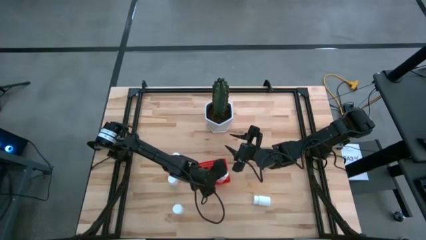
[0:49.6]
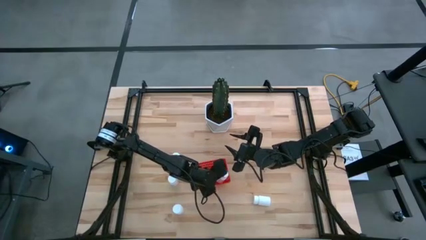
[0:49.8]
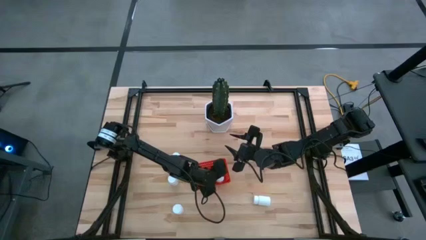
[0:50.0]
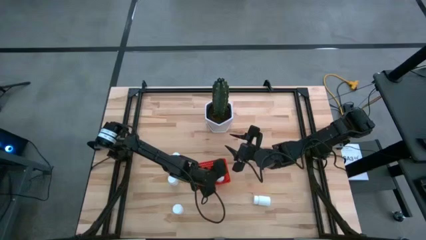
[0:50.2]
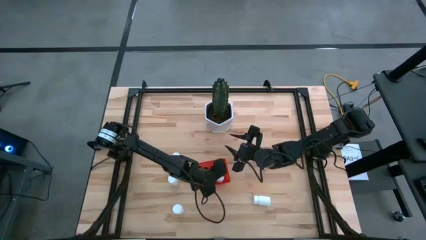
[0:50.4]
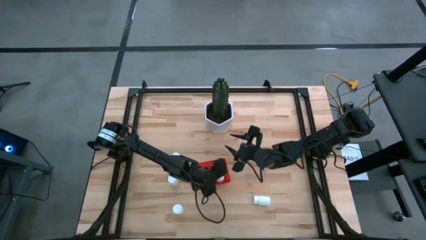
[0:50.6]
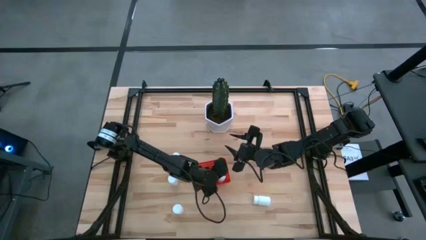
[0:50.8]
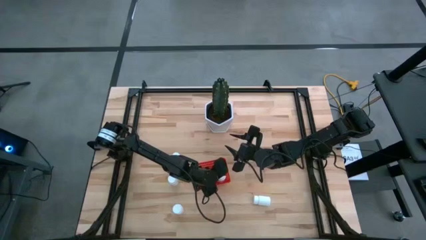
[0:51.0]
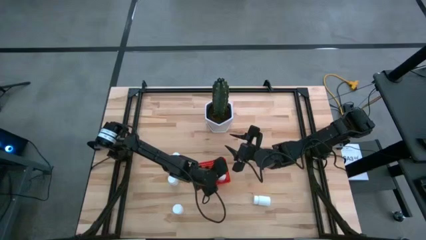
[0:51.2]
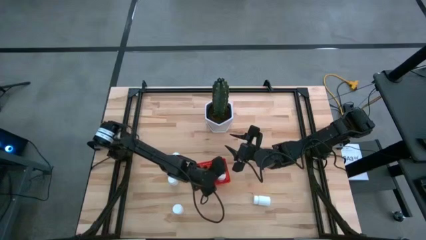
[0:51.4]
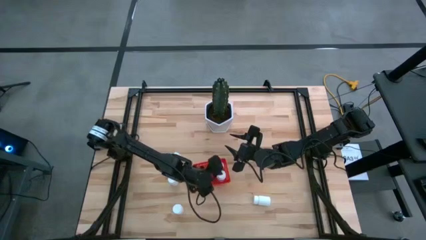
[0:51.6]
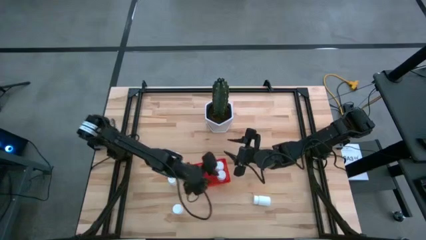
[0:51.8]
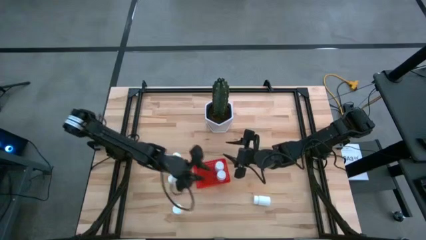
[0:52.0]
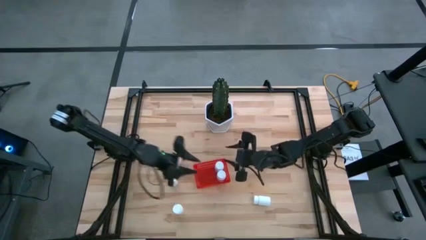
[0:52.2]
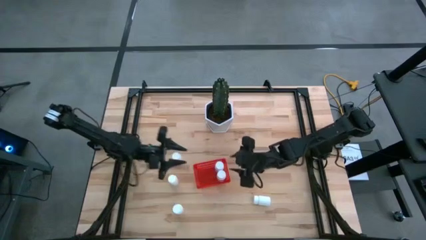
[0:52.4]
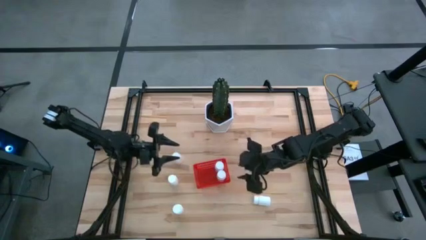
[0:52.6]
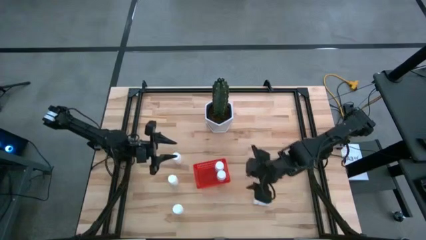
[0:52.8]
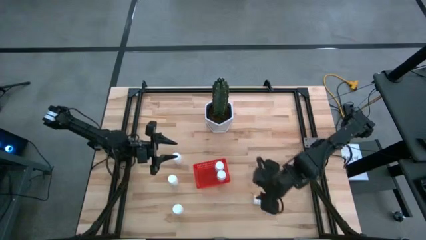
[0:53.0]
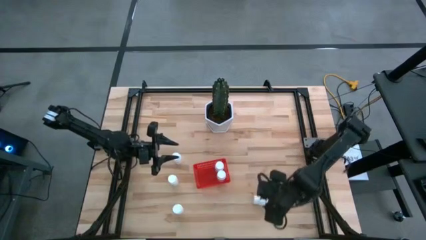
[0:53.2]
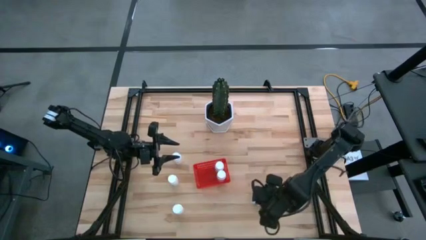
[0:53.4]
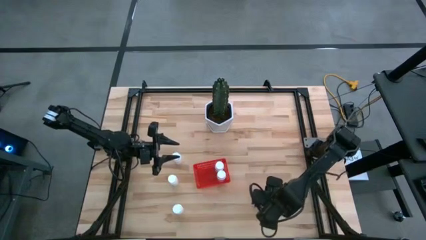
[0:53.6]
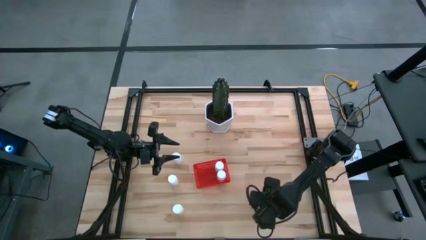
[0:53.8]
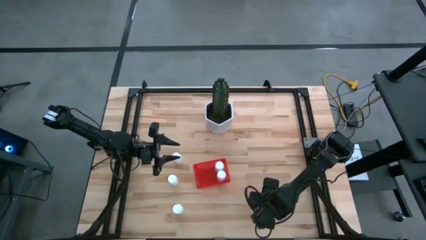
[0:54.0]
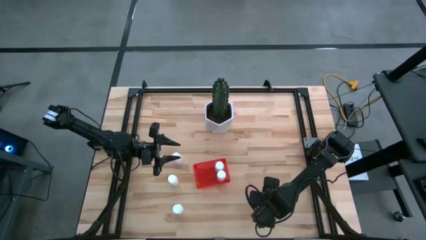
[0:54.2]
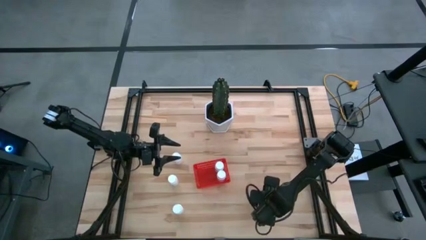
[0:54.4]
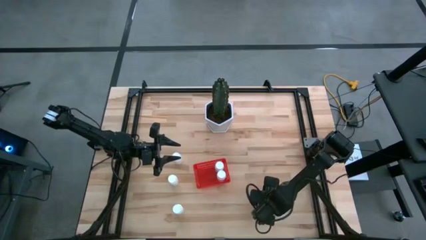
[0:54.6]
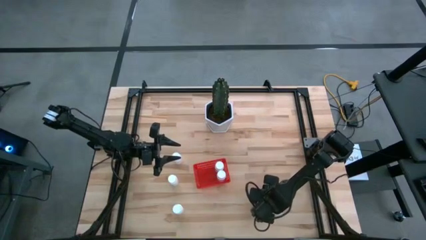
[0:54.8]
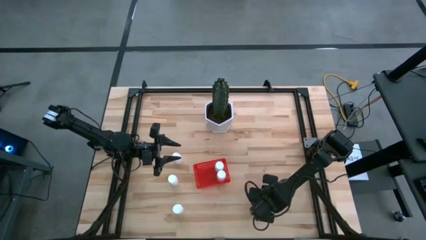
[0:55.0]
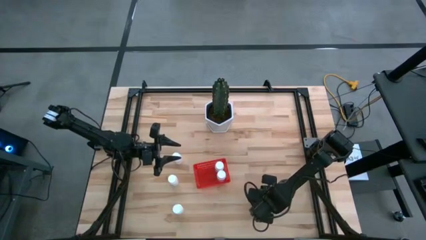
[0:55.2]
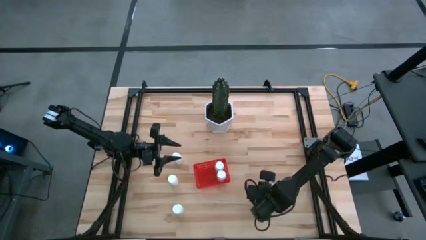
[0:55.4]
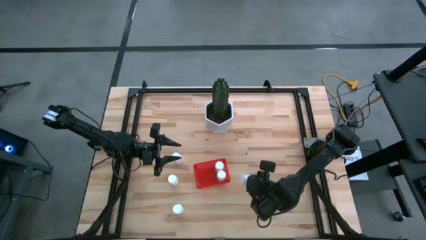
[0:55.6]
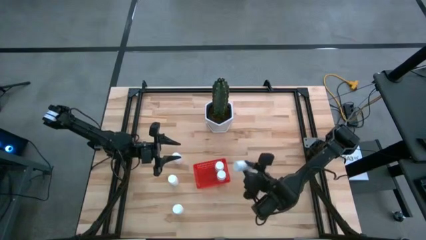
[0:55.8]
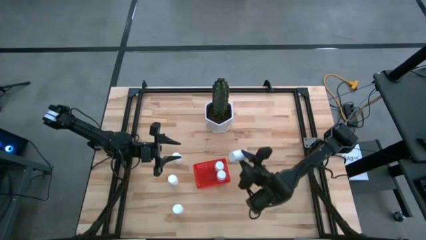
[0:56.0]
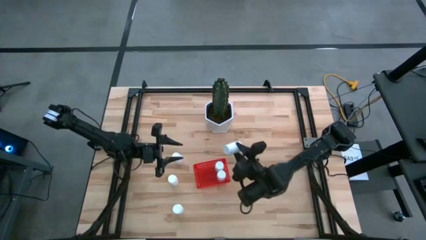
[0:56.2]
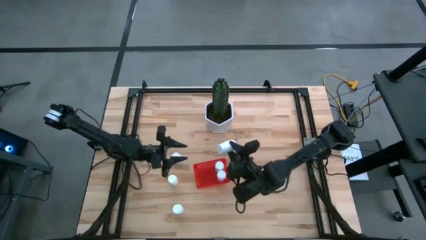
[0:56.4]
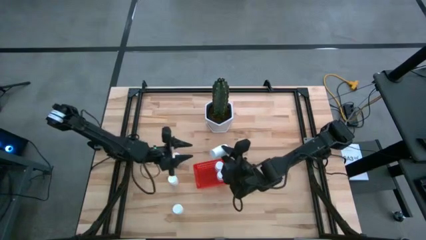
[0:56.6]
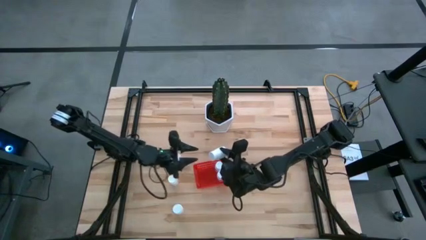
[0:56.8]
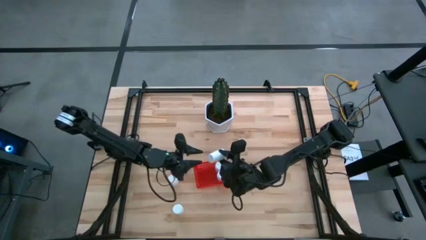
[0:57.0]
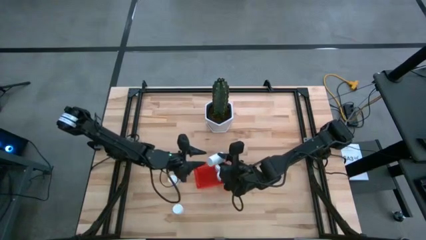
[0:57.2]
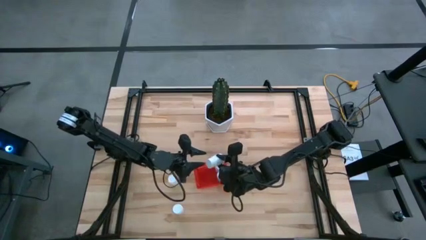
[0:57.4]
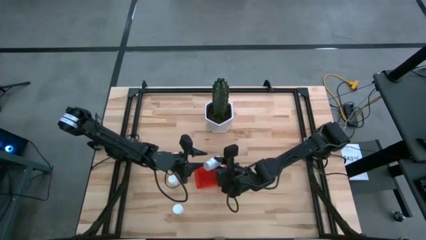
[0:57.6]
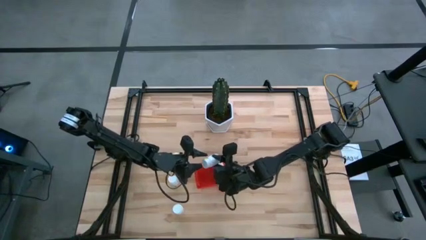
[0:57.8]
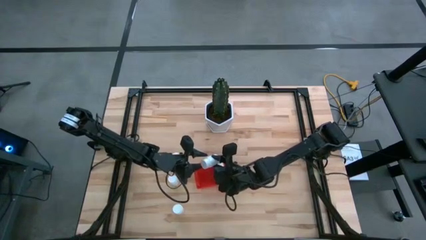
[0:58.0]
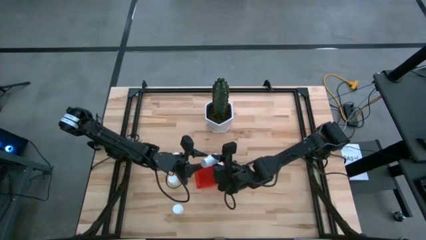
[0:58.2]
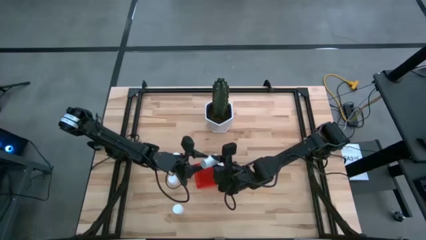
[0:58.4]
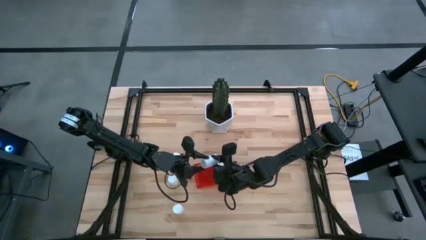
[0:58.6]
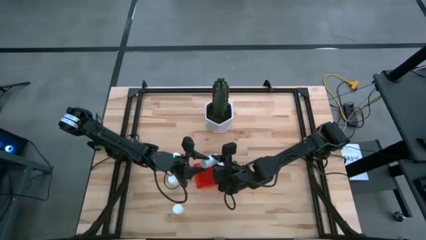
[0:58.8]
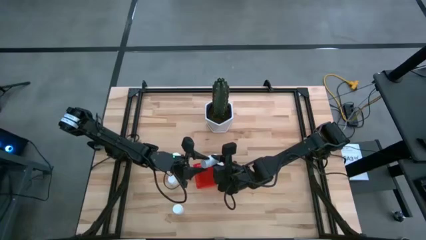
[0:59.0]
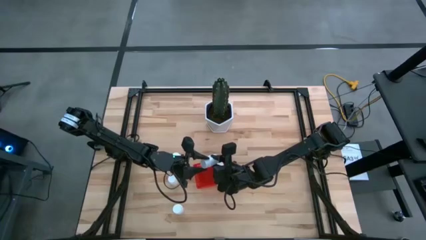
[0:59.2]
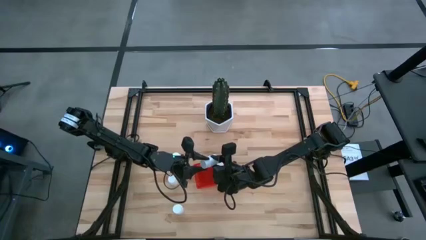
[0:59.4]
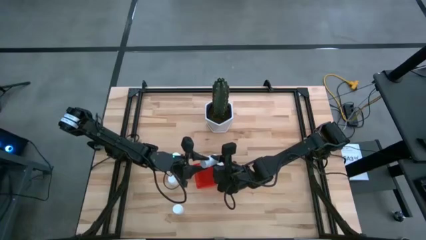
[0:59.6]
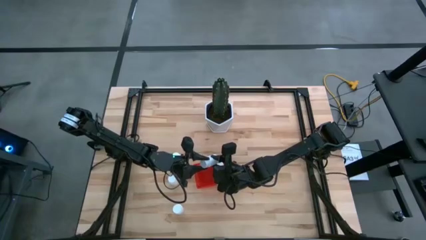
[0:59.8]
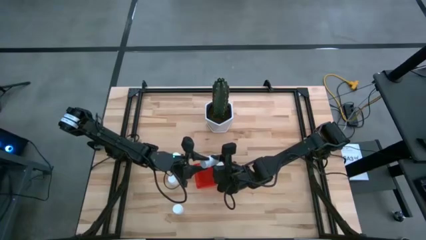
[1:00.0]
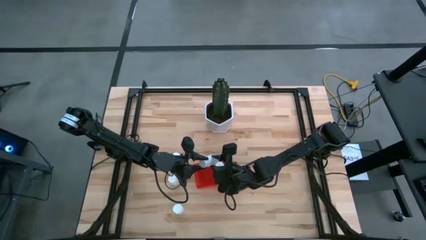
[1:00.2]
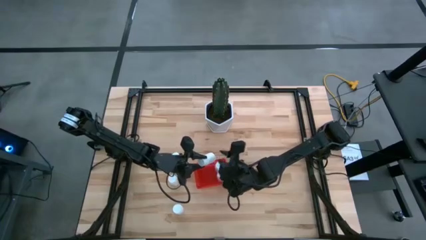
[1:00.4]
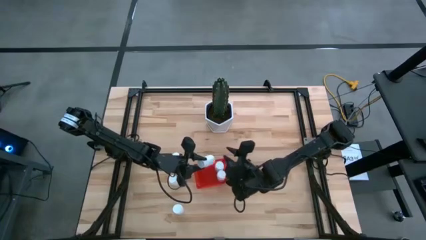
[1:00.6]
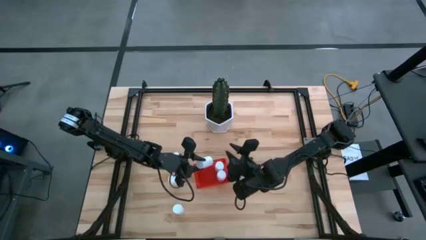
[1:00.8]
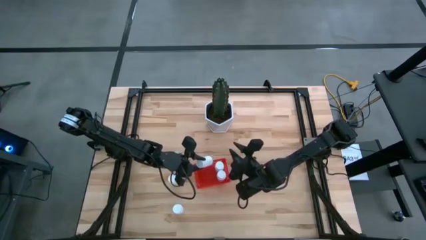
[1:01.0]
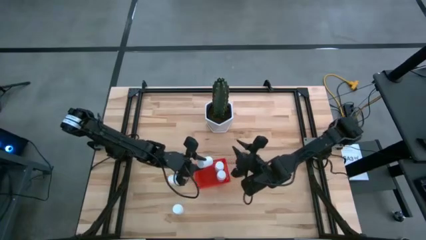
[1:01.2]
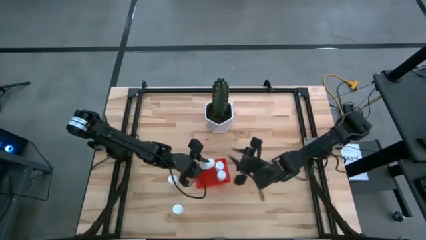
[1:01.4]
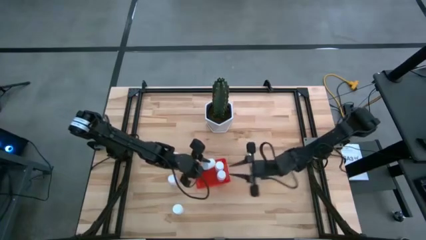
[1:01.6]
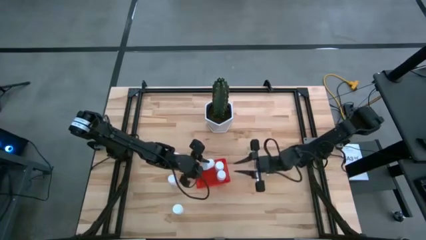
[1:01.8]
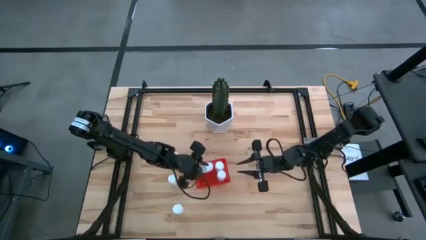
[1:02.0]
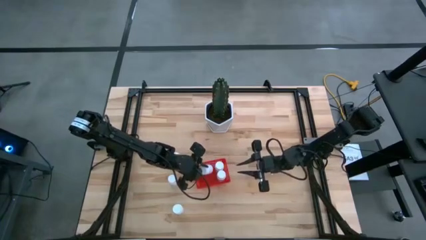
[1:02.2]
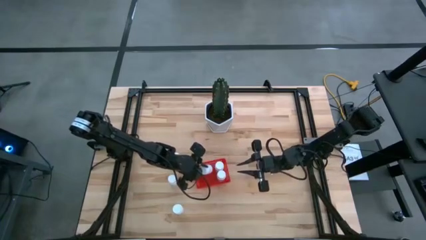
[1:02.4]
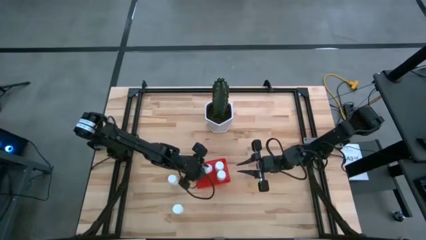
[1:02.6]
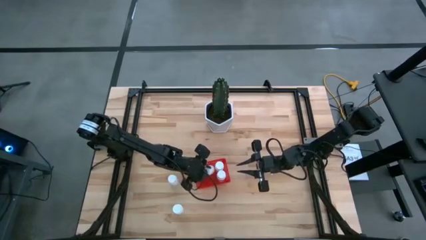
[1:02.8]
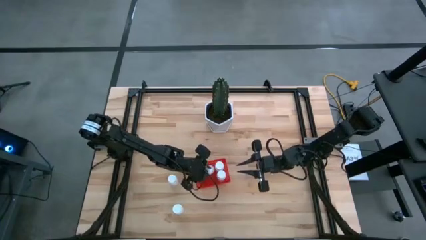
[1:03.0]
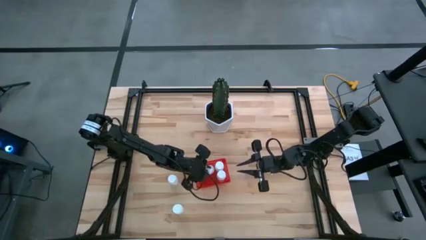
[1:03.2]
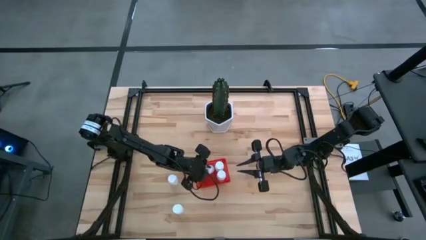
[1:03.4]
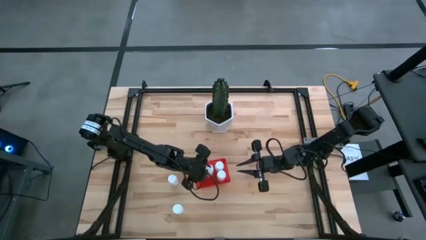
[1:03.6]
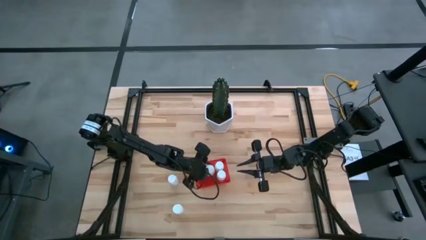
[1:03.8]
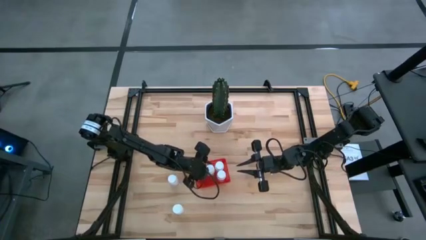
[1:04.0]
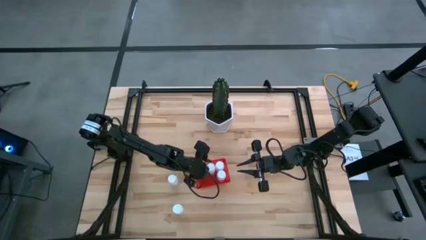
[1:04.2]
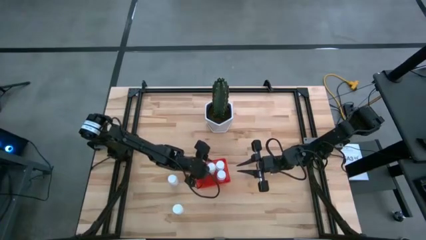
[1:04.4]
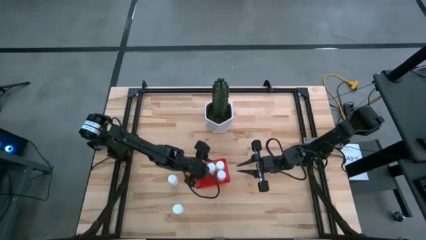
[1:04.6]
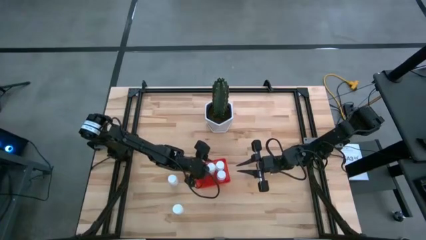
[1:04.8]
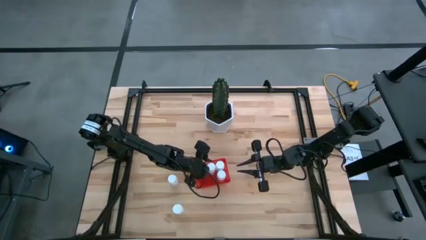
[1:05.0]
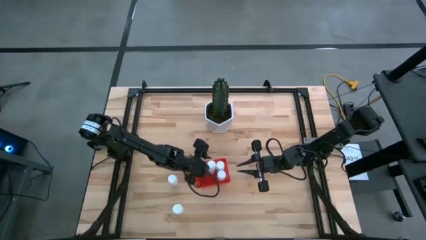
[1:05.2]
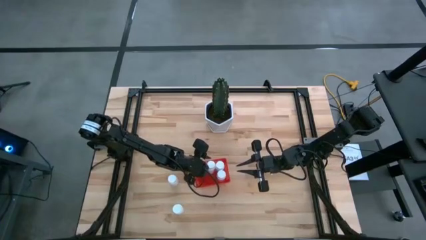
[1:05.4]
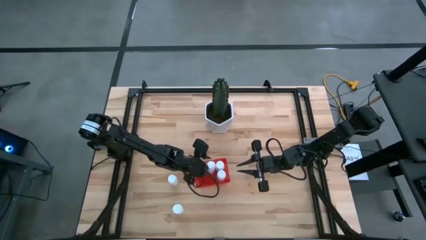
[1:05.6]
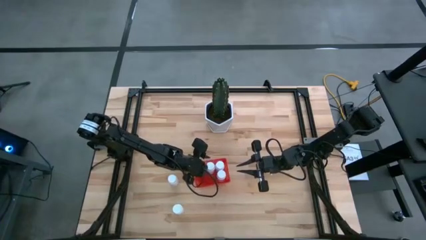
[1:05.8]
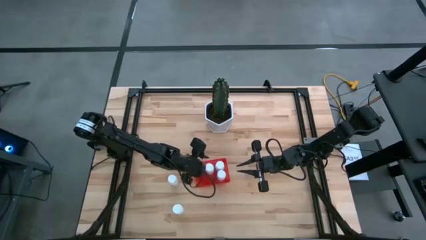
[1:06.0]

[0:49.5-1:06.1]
Task: Pick and place pill bottles into a basket
Put the white pill bottle into the red bin
